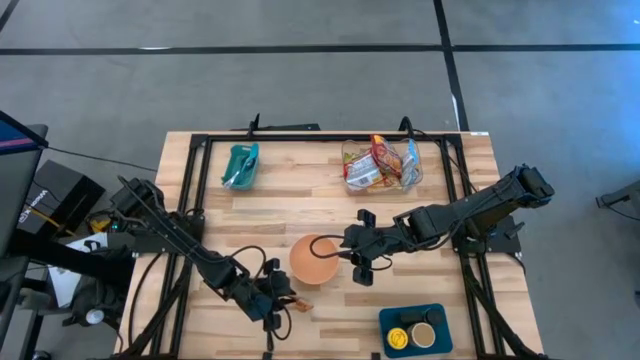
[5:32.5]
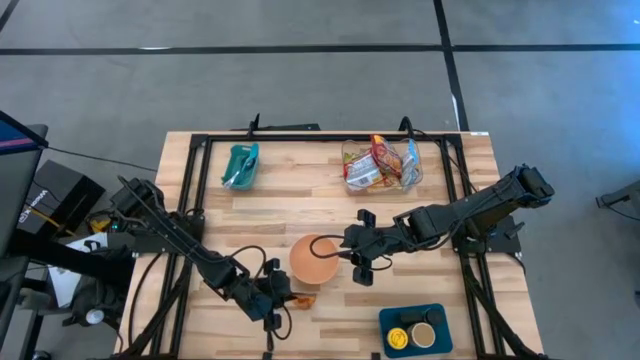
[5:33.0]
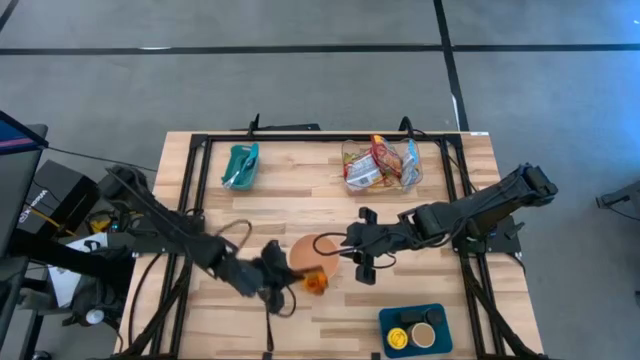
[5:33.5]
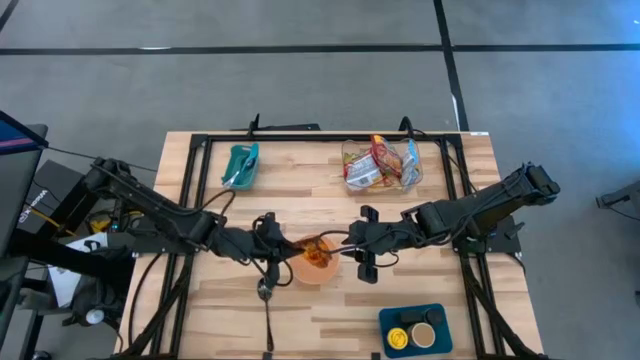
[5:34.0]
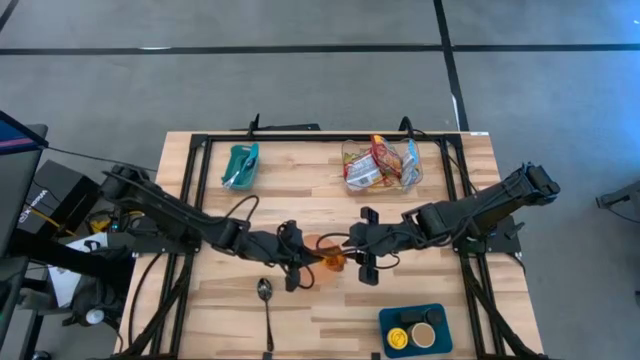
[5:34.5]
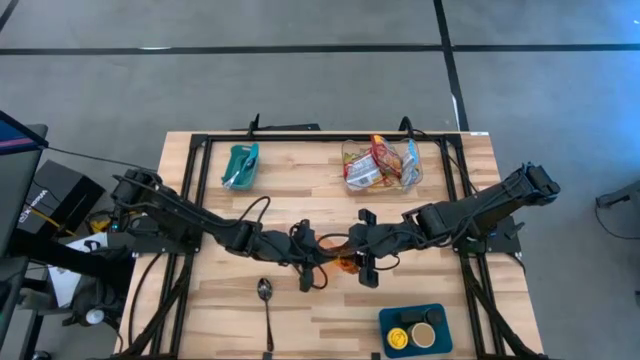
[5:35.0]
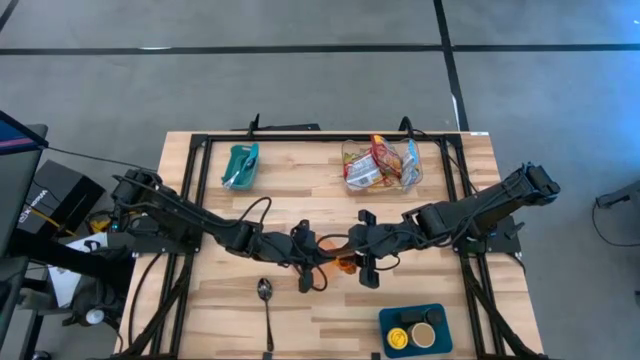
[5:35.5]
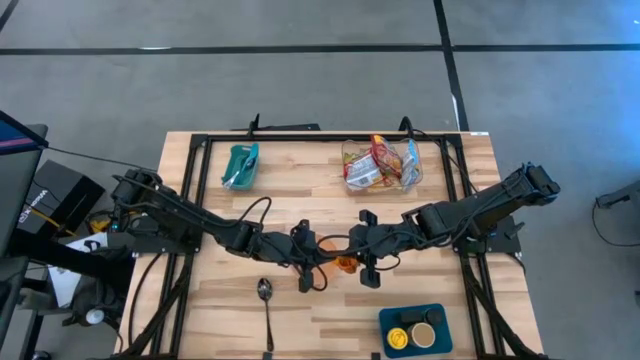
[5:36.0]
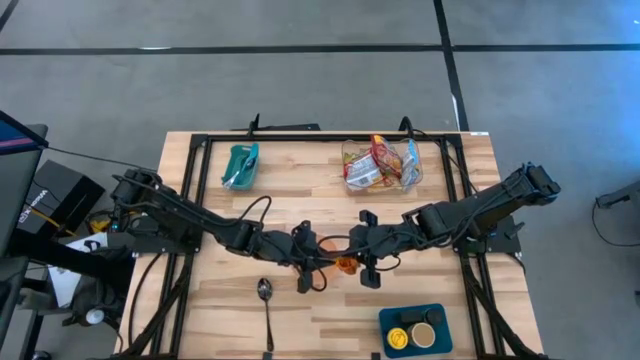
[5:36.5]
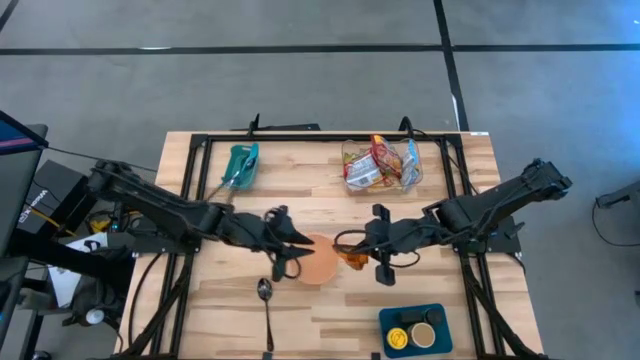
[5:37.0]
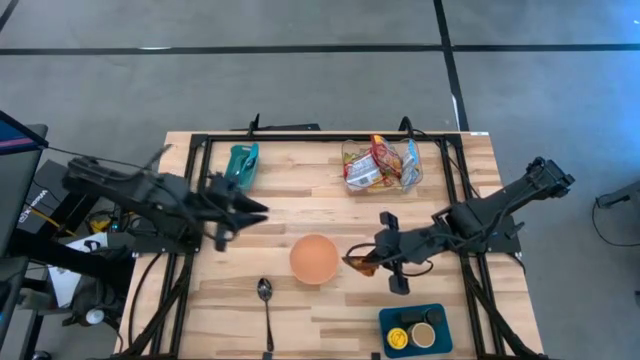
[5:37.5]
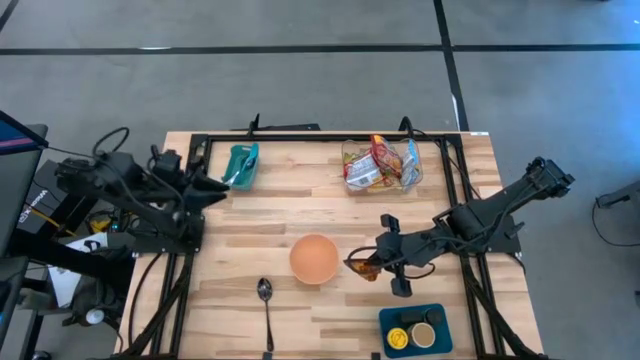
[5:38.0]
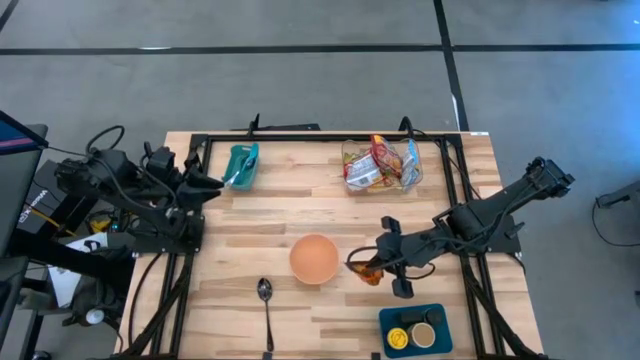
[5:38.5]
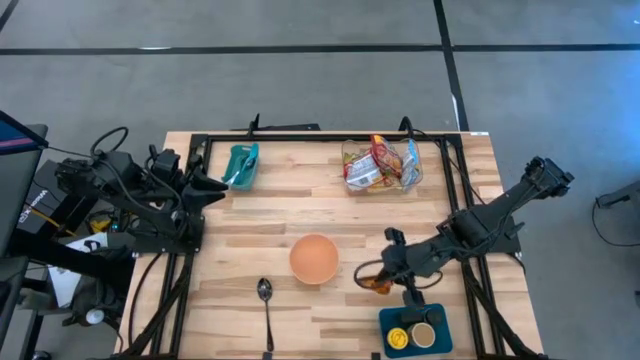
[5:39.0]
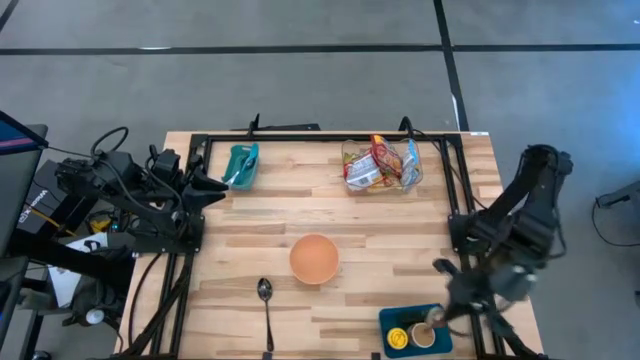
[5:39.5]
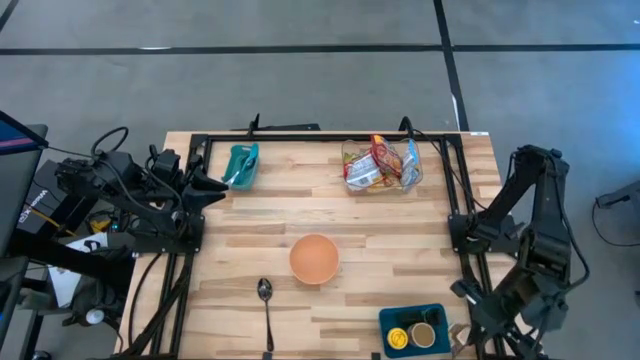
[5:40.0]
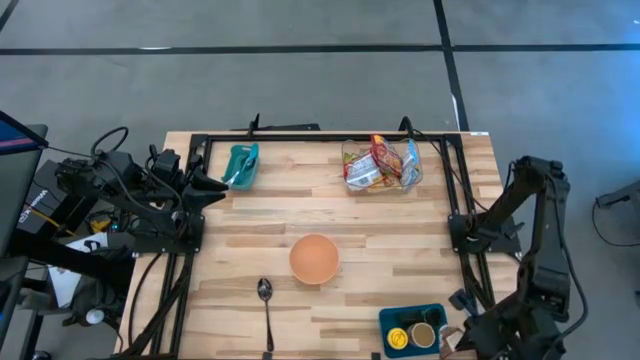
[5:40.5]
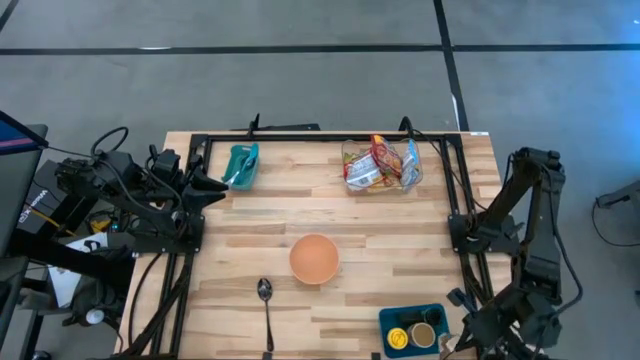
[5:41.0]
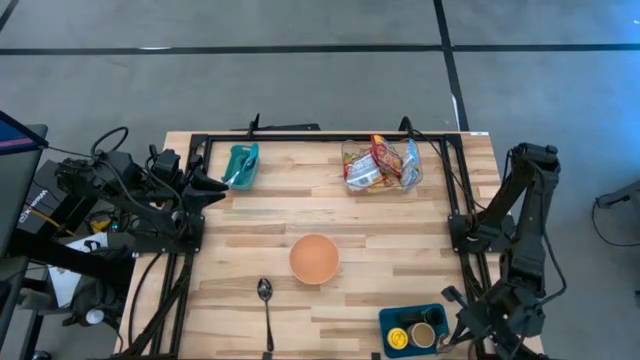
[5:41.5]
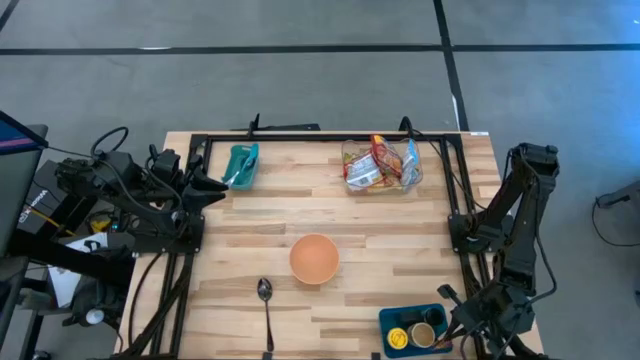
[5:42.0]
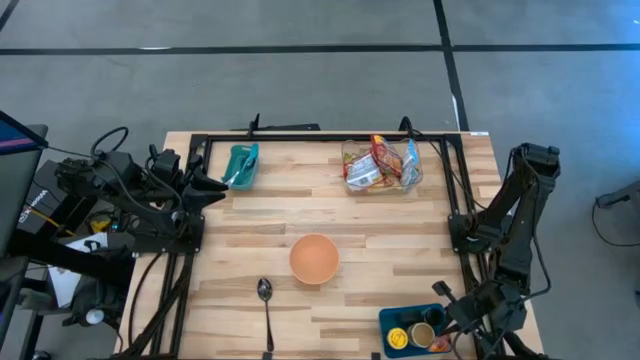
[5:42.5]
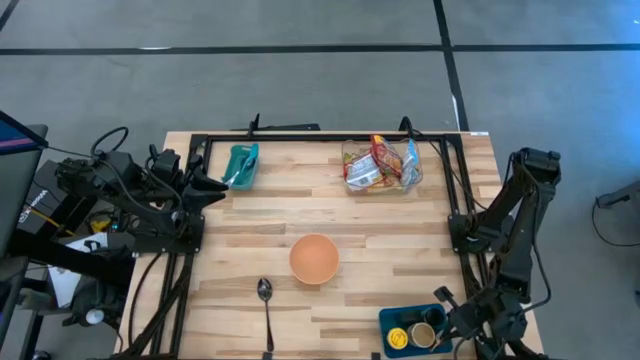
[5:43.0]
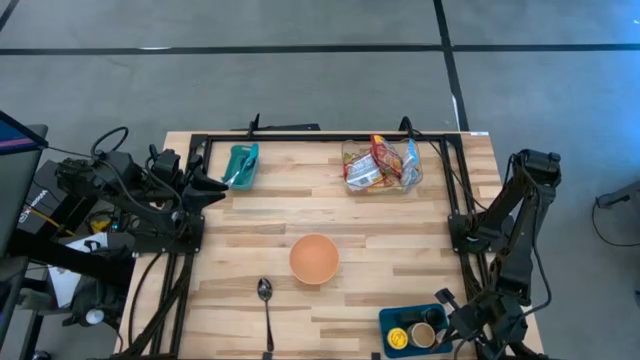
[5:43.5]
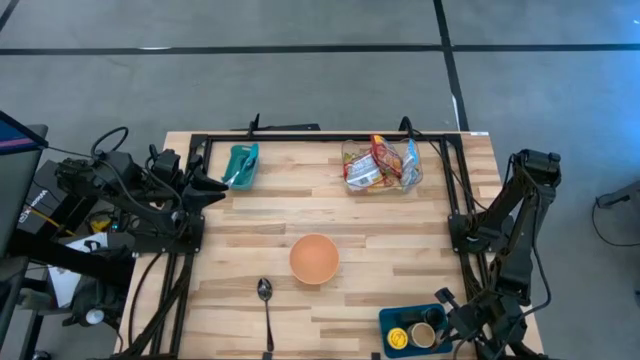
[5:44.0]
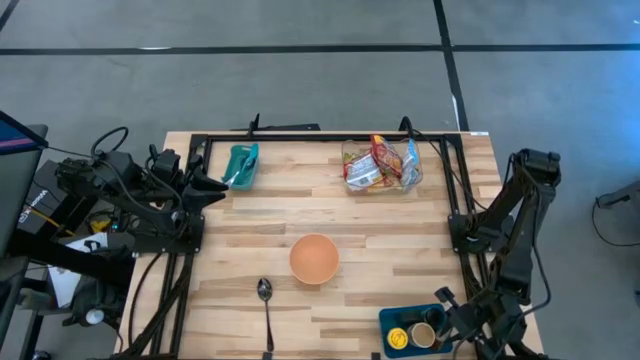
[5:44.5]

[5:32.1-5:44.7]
Task: Pick & Place Food Item
Put the orange seasoning pack into the dark blue bin

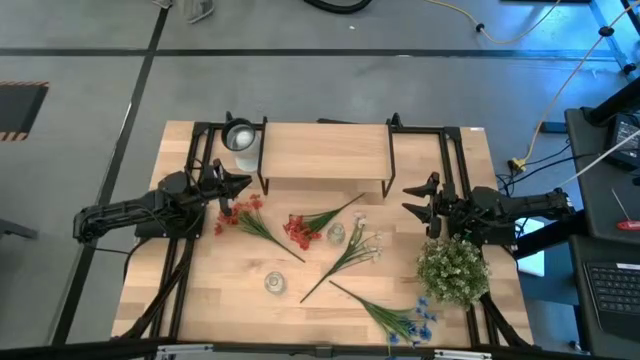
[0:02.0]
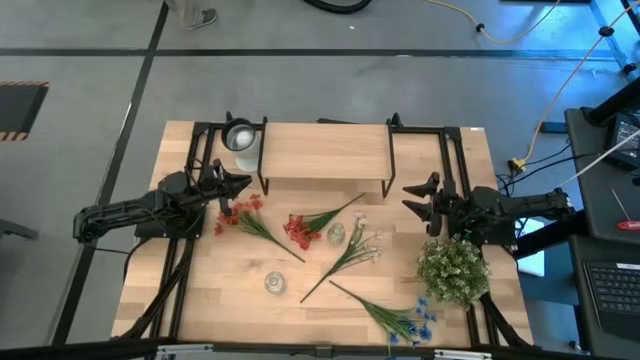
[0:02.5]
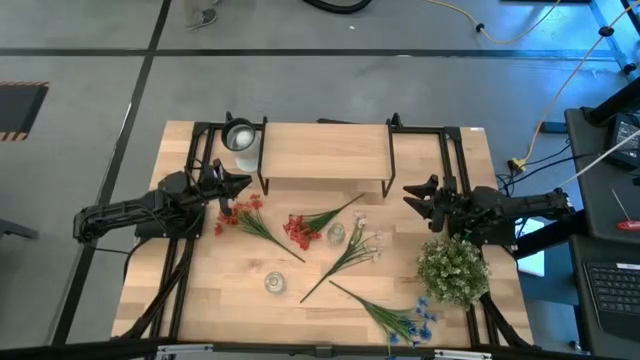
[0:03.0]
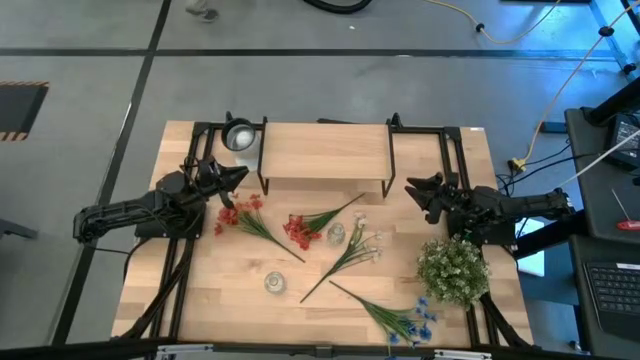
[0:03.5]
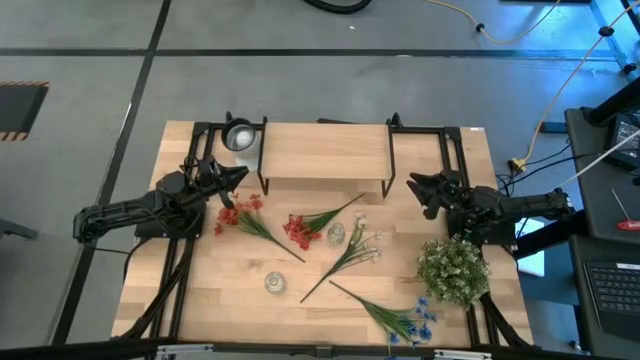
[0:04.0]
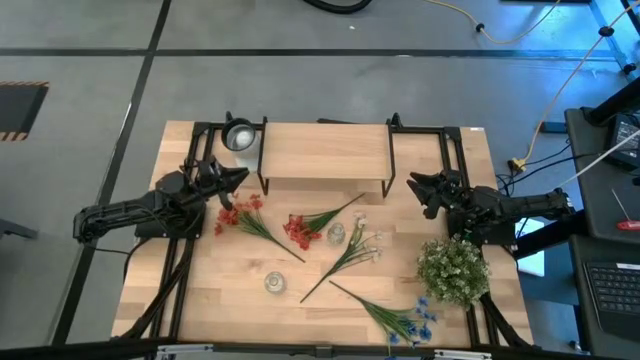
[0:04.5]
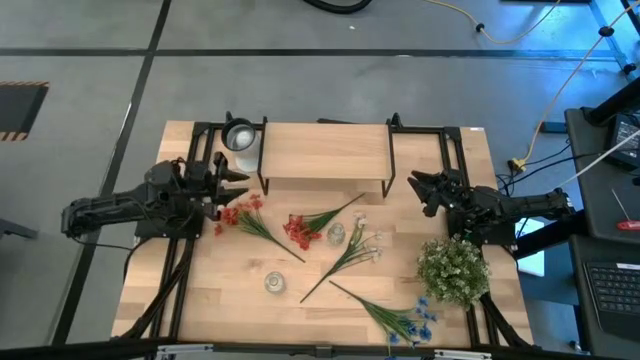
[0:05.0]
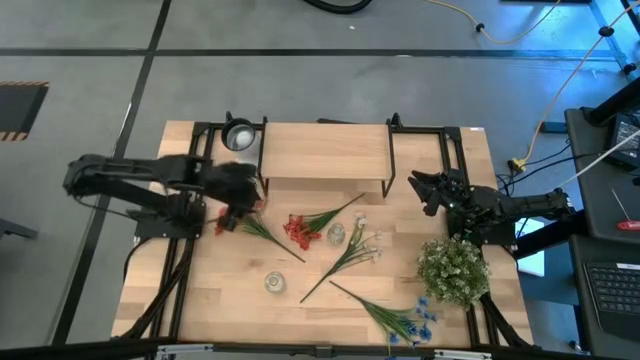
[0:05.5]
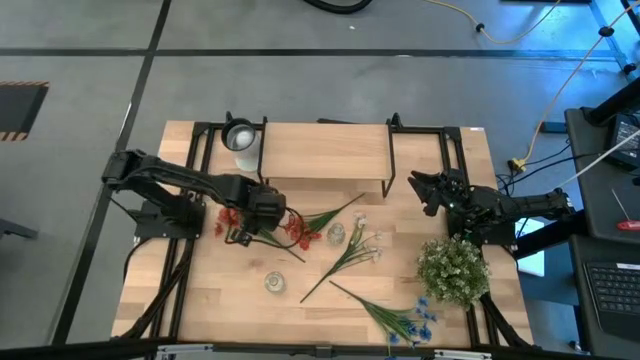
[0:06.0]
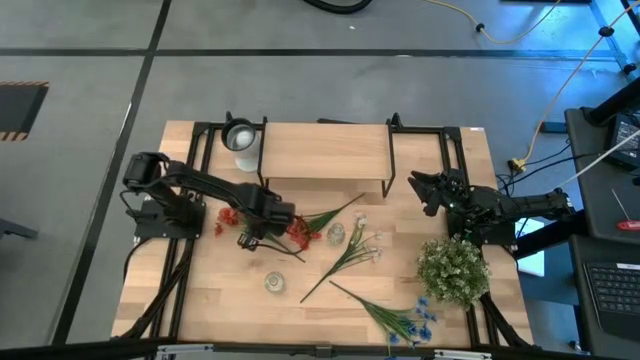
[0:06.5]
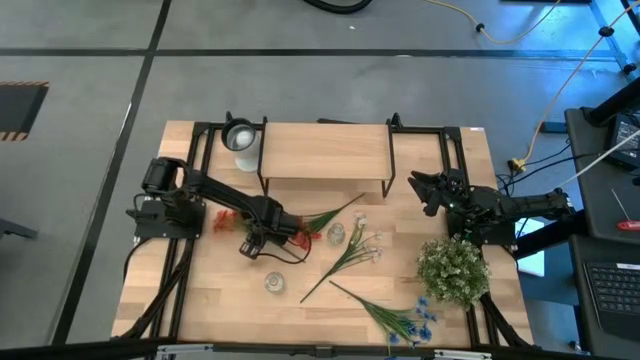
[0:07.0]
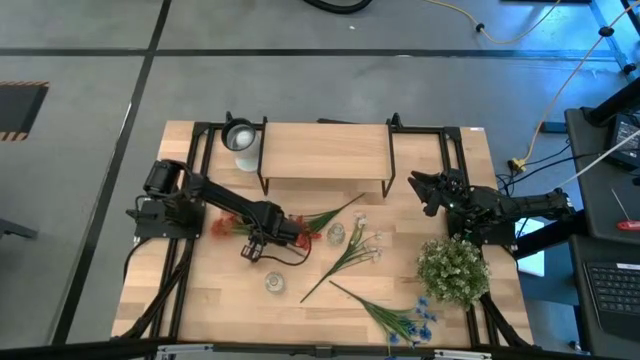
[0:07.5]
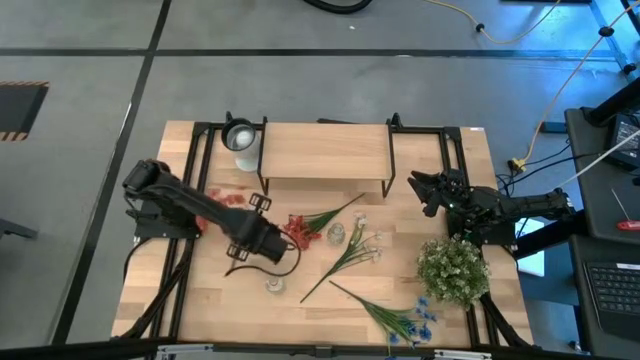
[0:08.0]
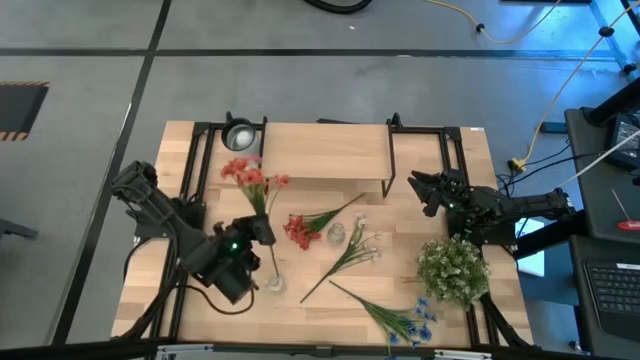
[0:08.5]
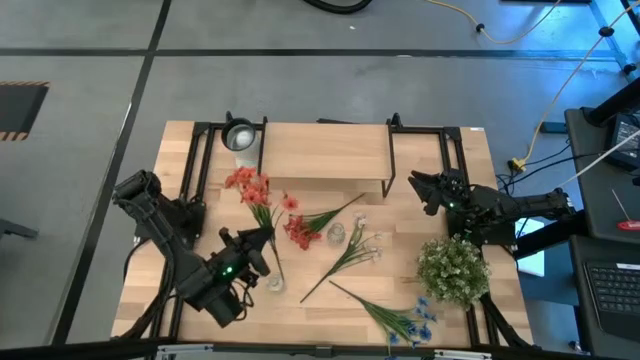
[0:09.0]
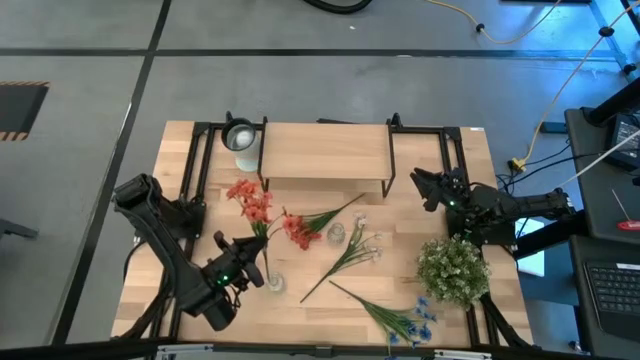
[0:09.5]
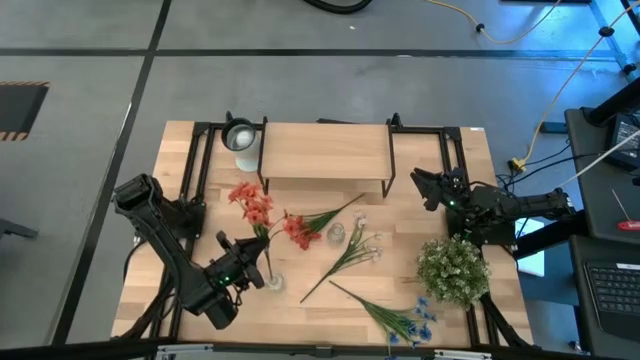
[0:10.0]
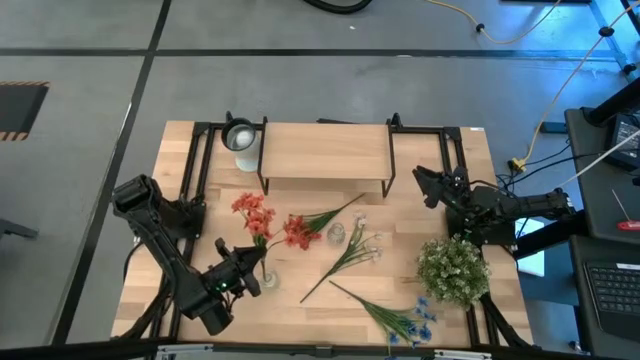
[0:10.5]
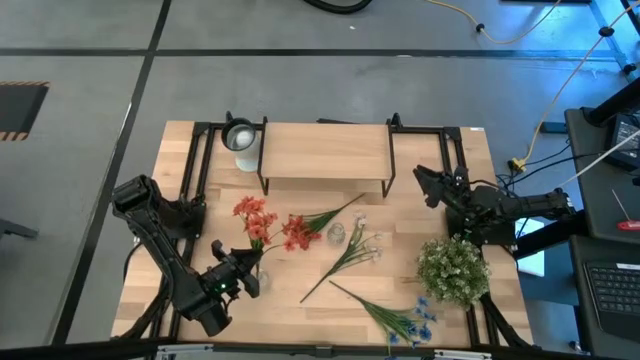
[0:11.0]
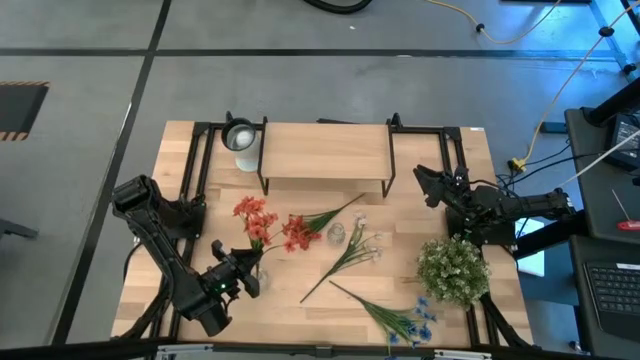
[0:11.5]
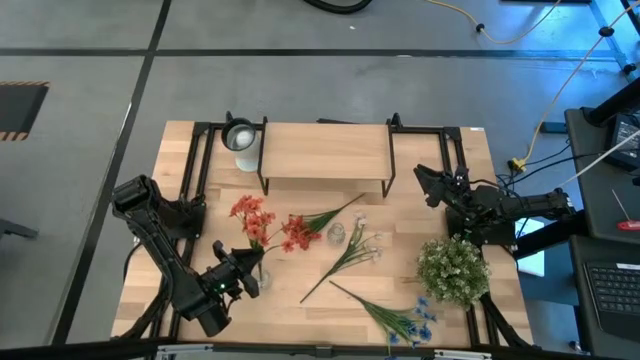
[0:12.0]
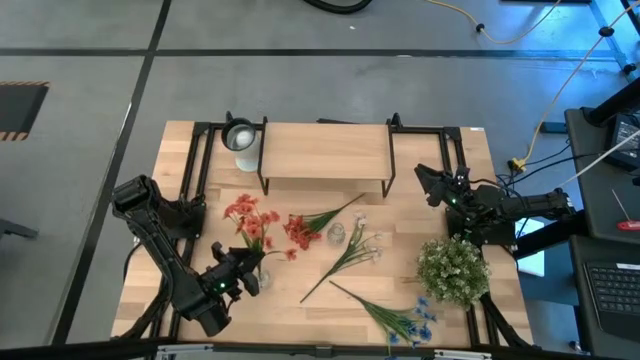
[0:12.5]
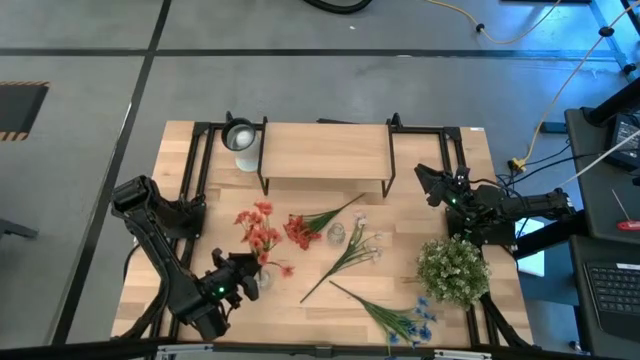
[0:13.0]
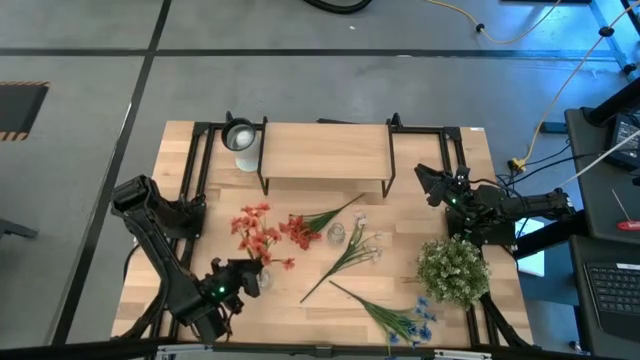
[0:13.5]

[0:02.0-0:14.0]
Task: Pick and place flowers into a vace then onto a shelf
Put the left orange flowers into the left transparent vase
